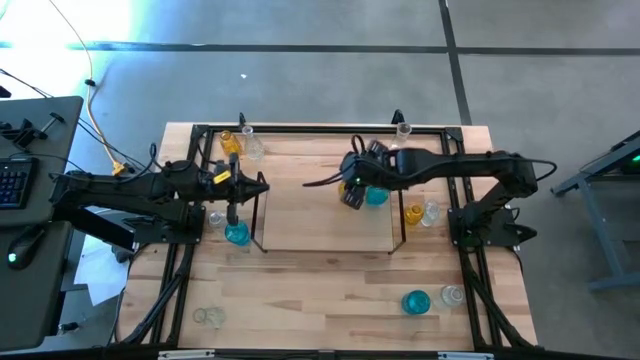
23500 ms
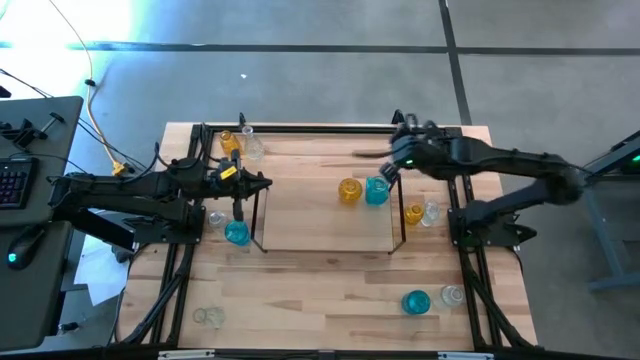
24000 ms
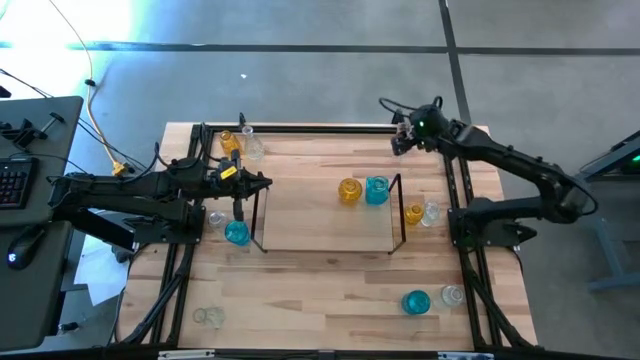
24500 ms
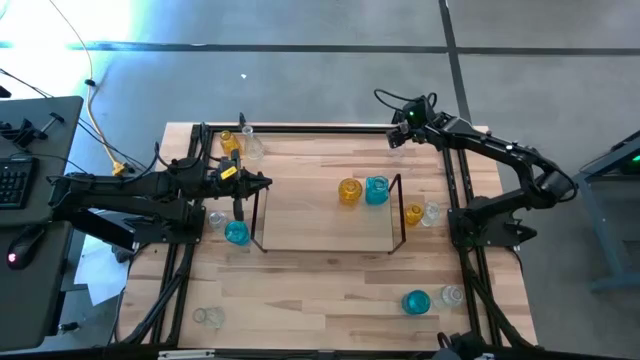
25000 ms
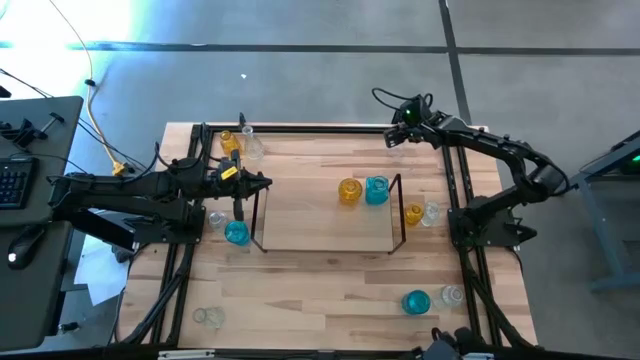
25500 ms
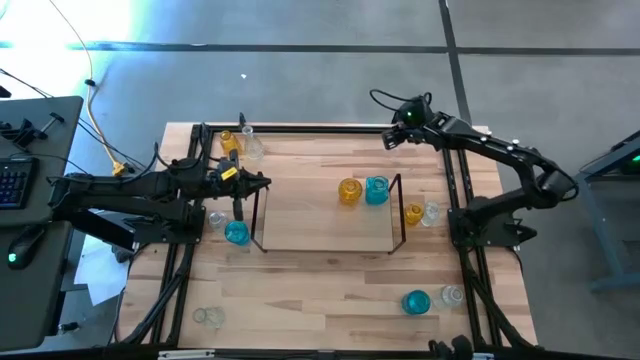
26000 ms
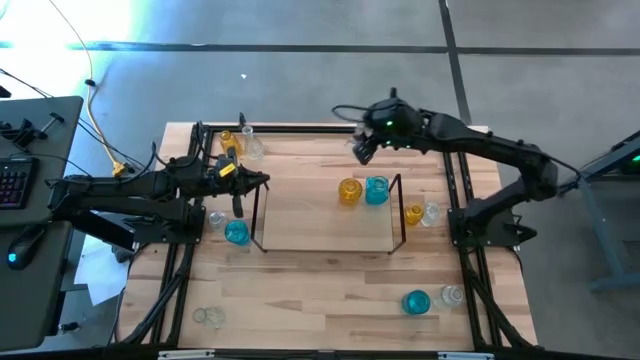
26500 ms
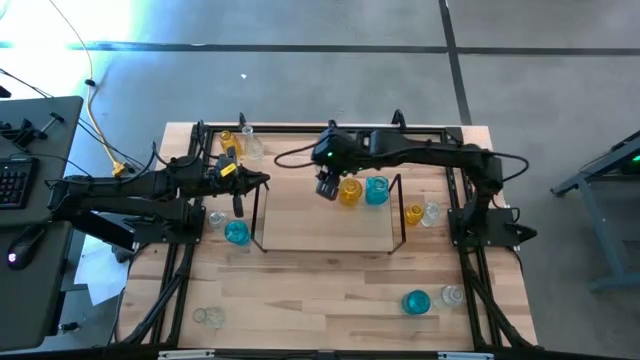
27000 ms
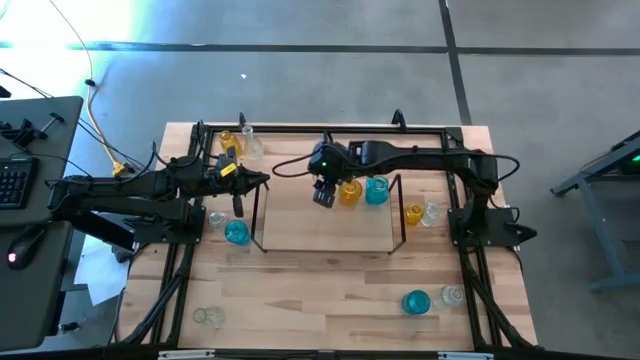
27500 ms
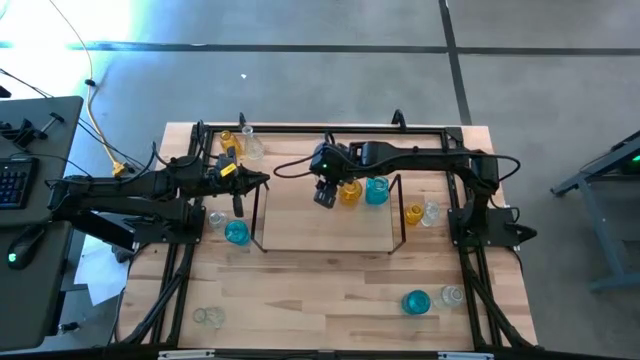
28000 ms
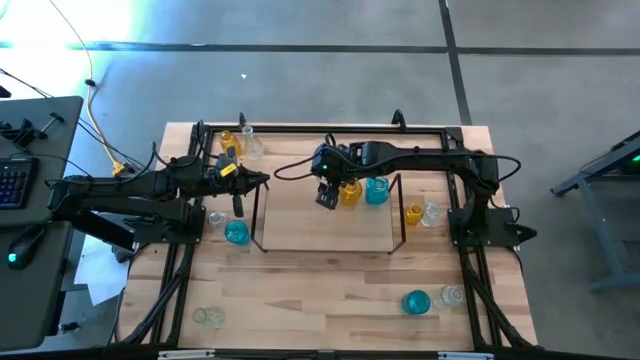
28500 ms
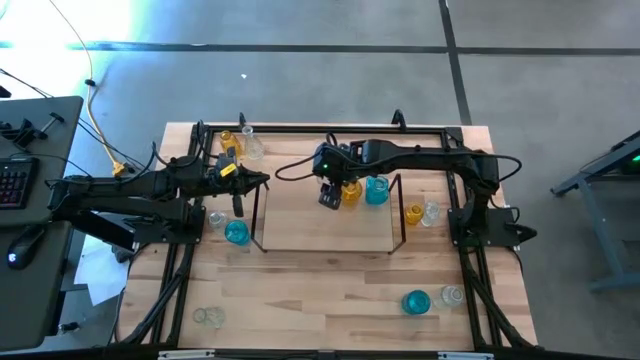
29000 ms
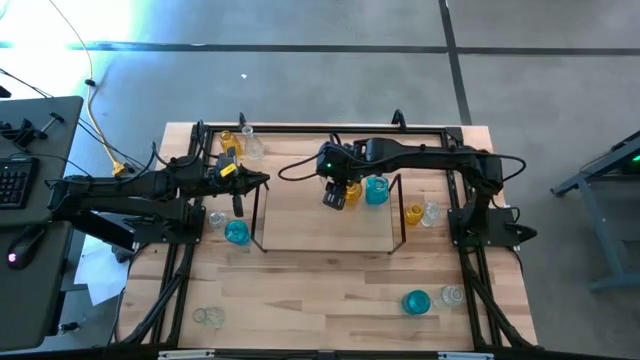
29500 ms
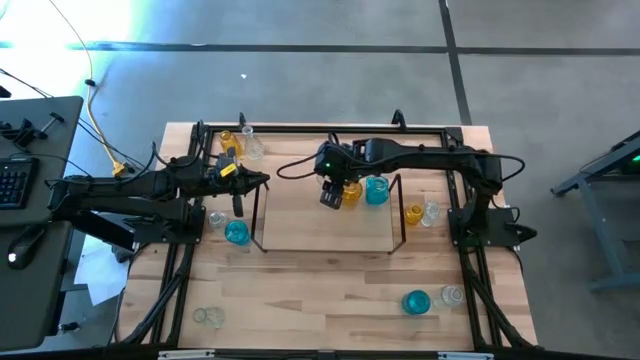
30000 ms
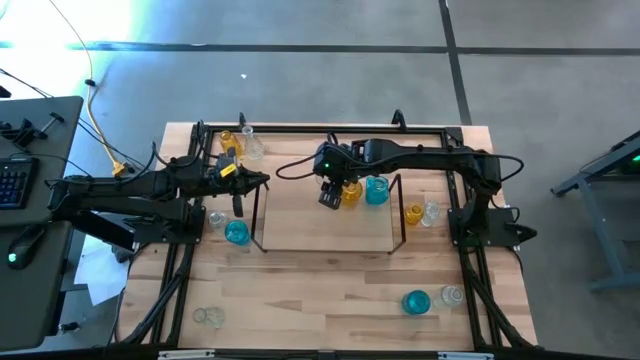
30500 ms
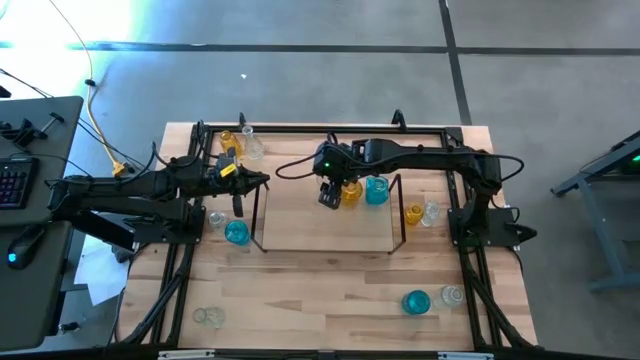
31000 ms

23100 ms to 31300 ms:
Task: sort vases onto shelf
Put the transparent vase on the shelf

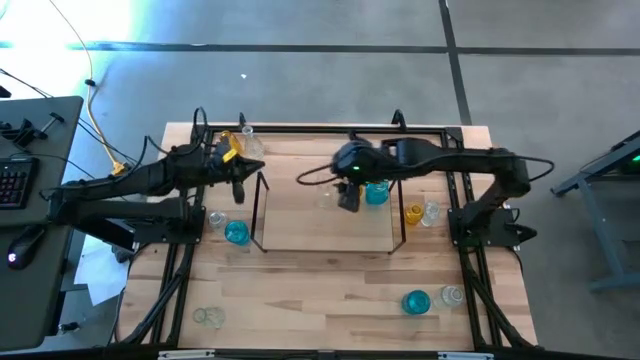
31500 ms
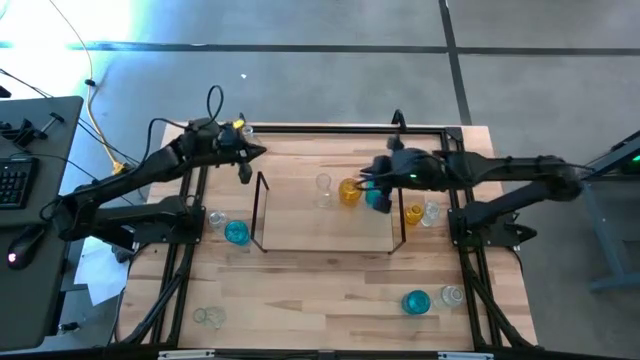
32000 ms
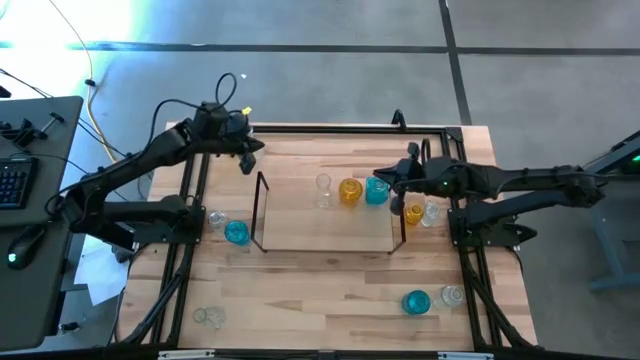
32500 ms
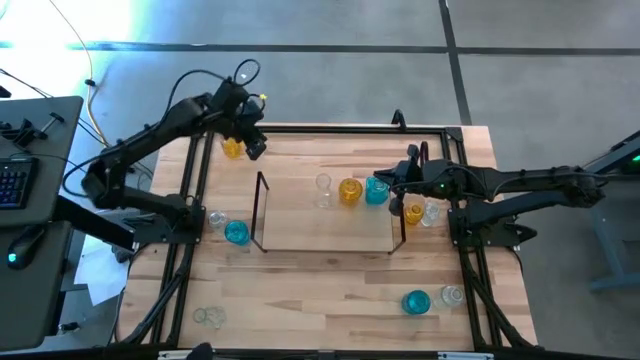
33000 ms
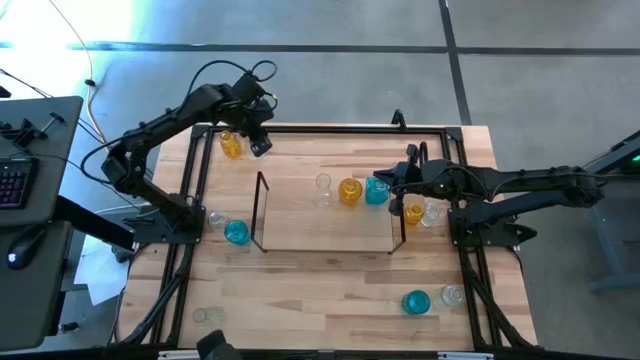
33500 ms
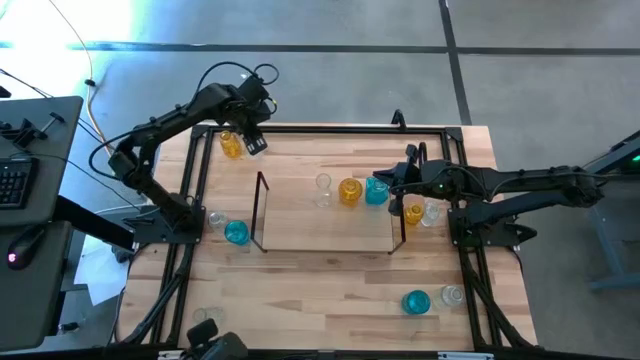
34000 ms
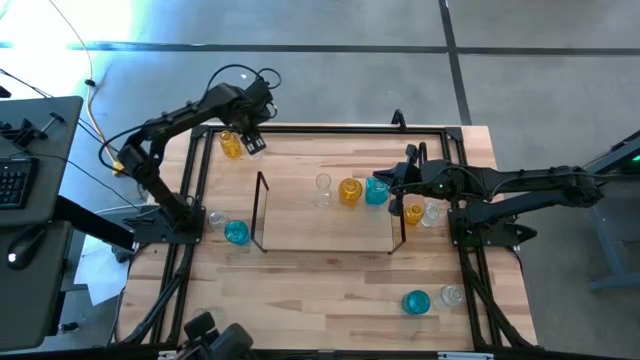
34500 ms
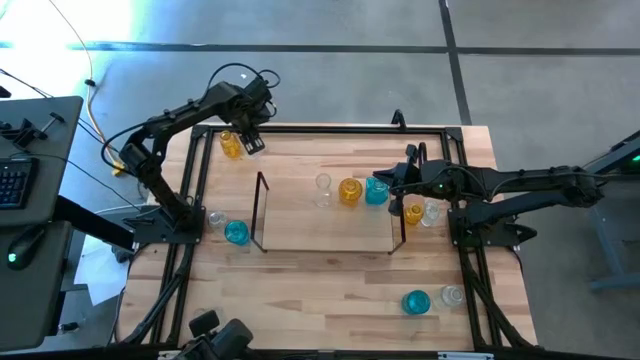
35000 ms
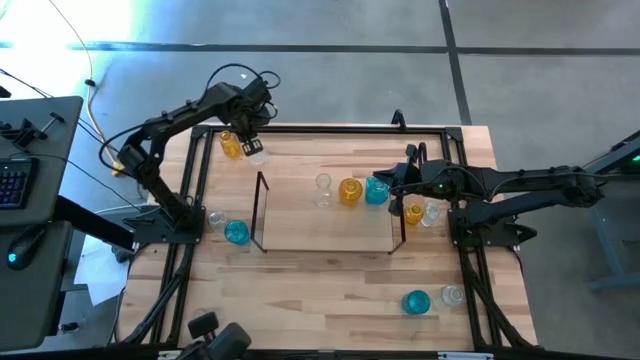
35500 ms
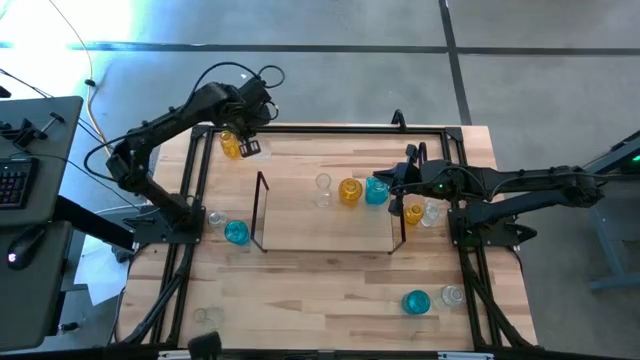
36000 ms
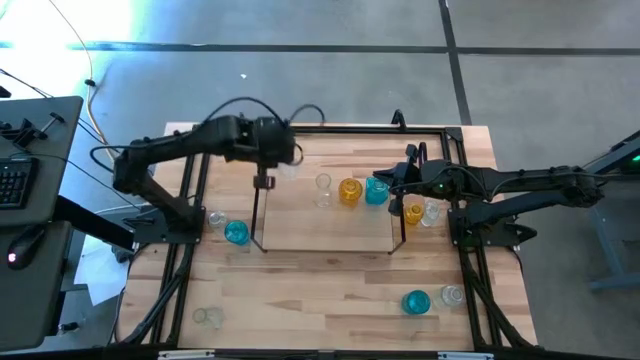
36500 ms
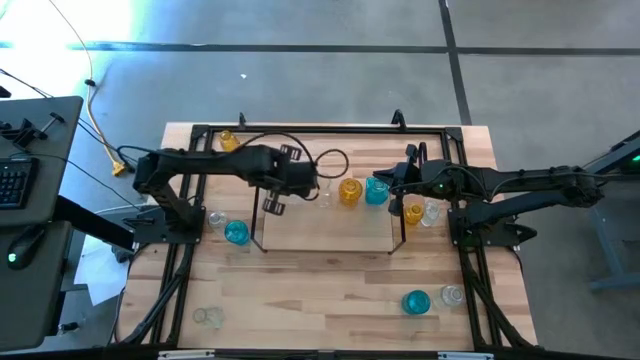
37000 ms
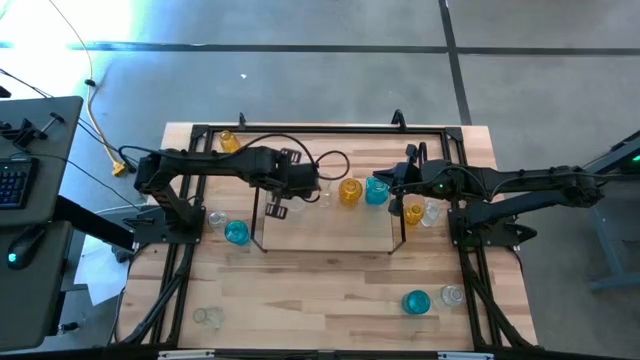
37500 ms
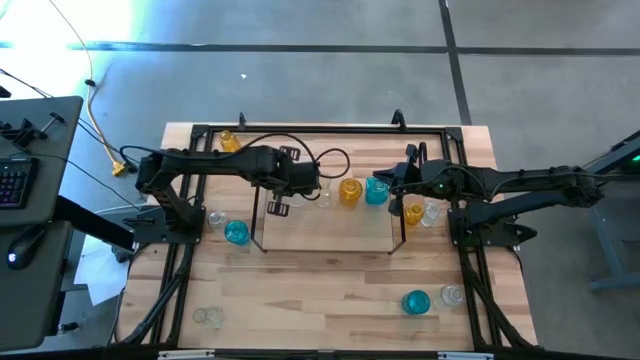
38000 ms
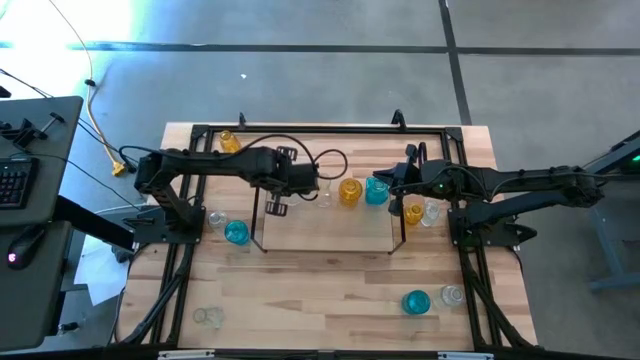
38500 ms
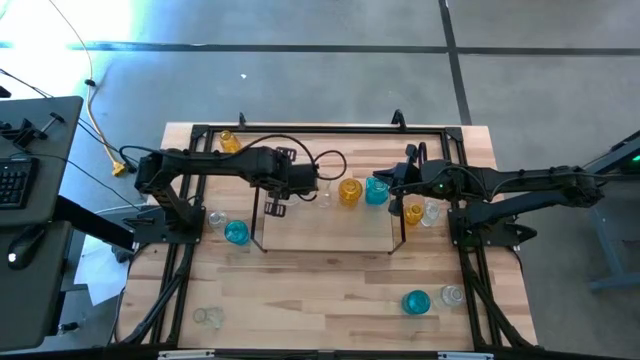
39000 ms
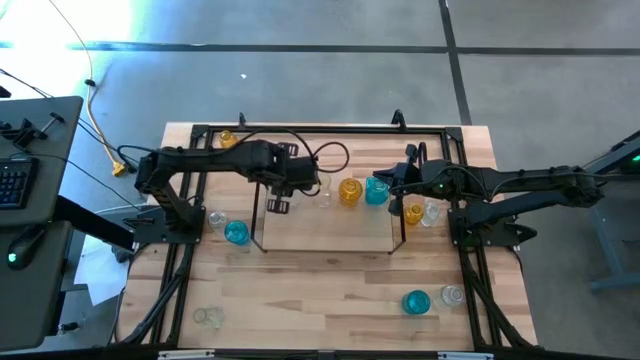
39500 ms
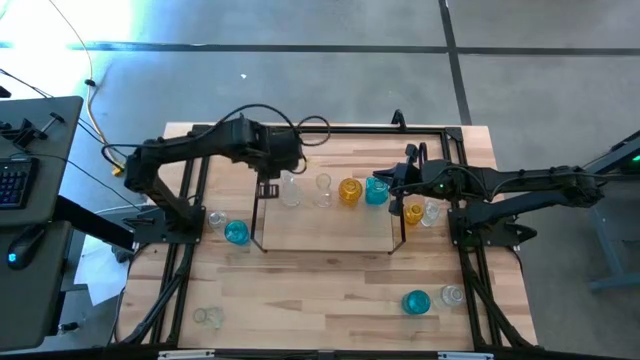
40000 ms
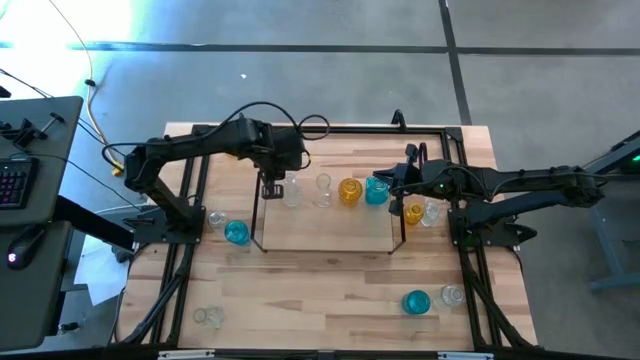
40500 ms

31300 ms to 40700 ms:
Put the transparent vase on the shelf

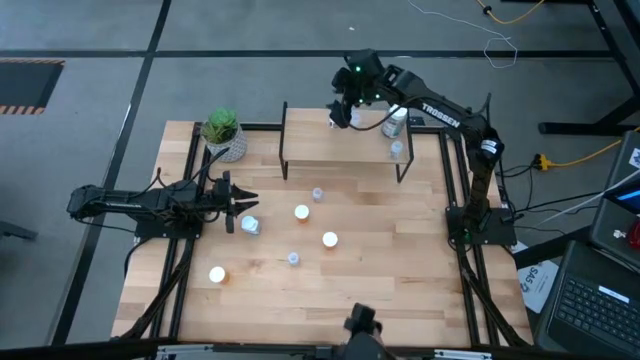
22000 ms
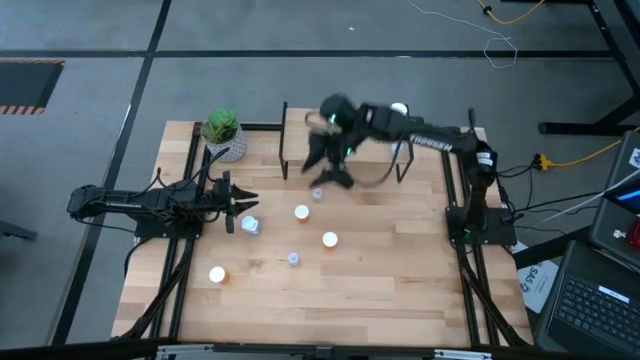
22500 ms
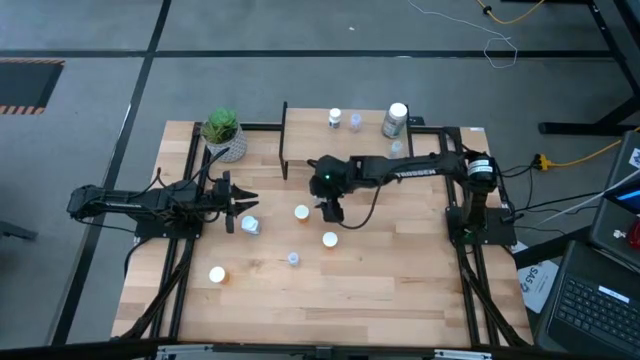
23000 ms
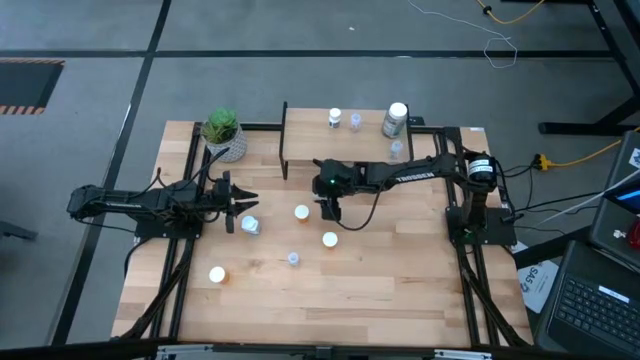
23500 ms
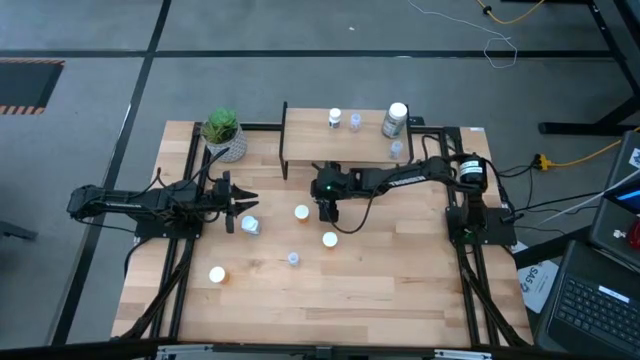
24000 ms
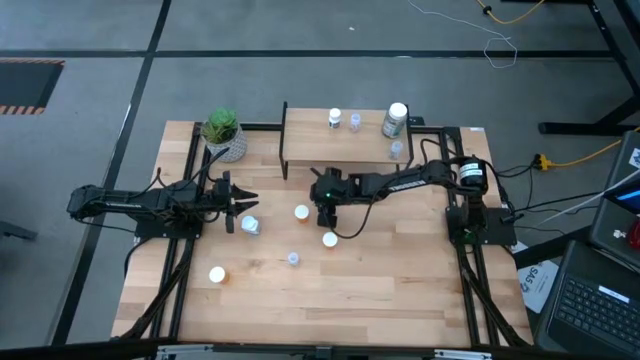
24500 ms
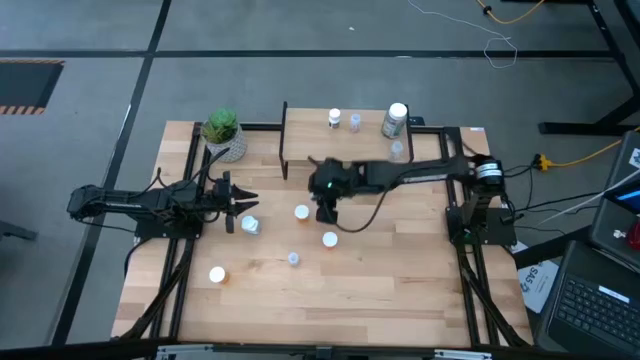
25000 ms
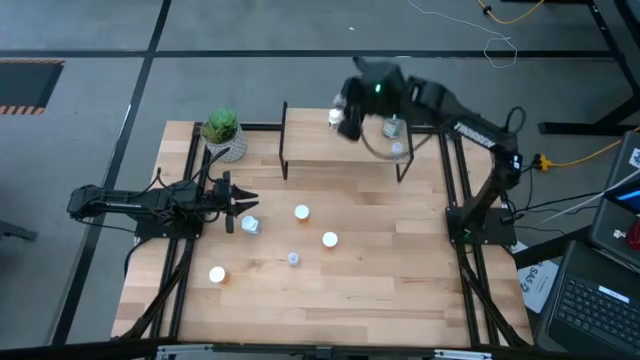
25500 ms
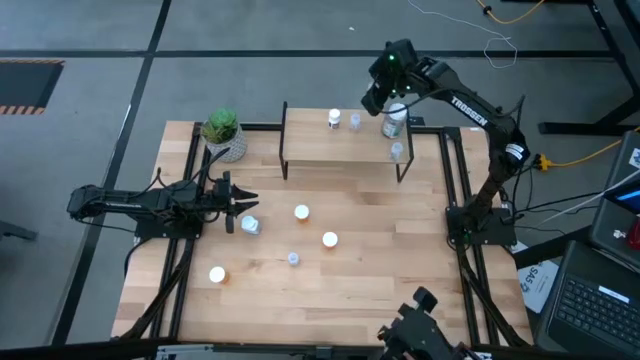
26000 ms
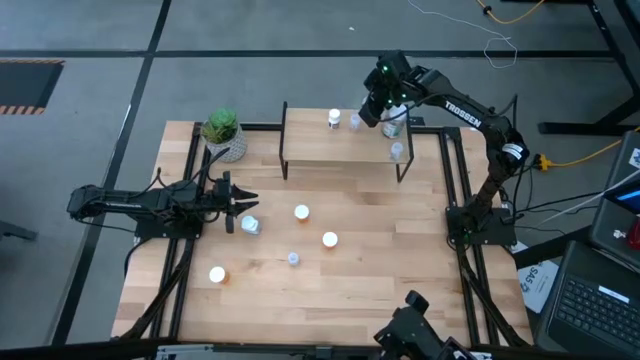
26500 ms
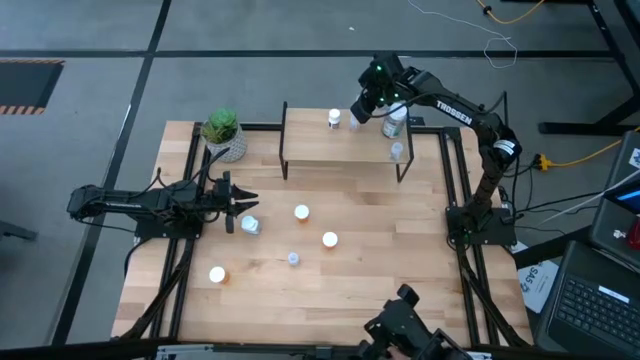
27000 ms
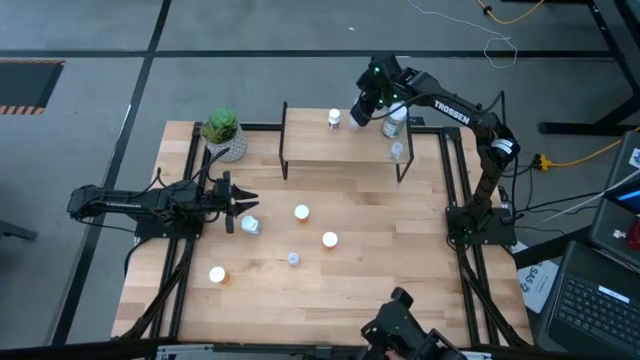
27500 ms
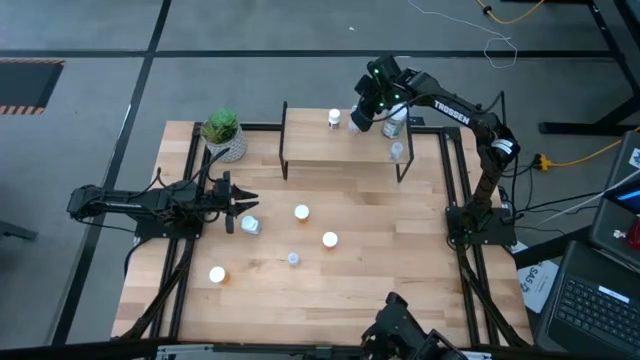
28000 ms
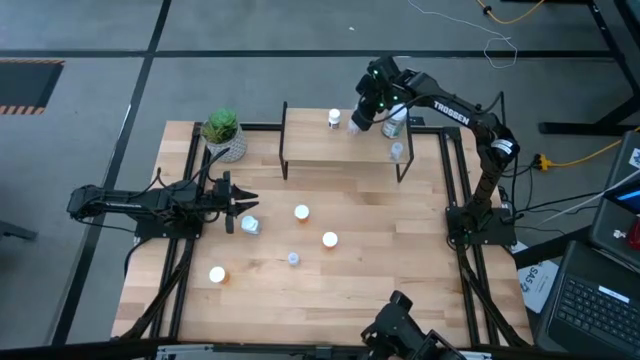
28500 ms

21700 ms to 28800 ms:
Task: Pick and place medicine bottles onto shelf by color
Put the transparent pill bottle on the shelf
